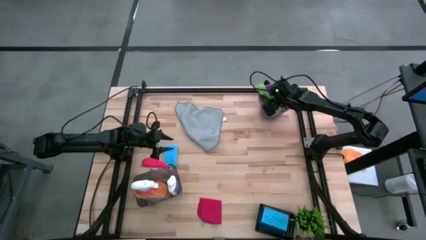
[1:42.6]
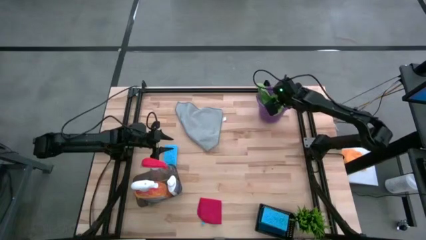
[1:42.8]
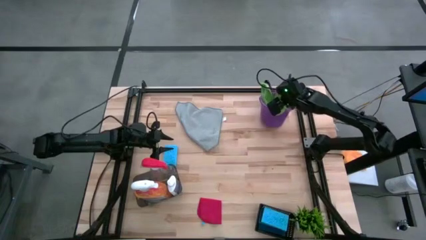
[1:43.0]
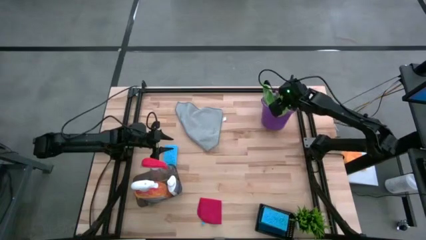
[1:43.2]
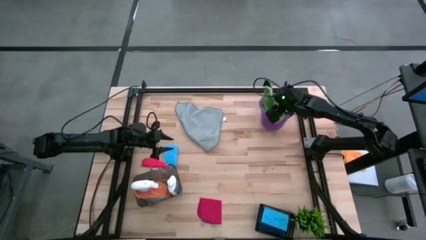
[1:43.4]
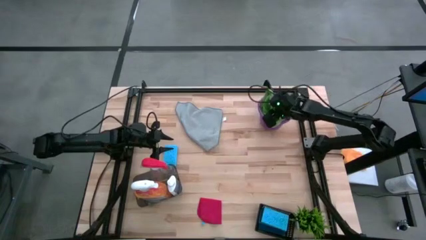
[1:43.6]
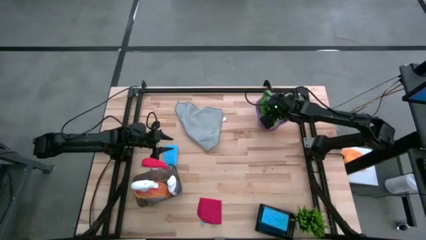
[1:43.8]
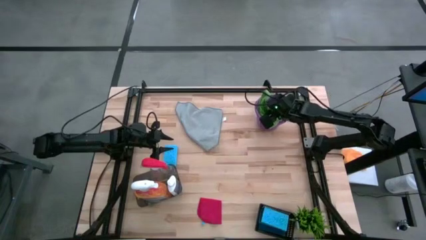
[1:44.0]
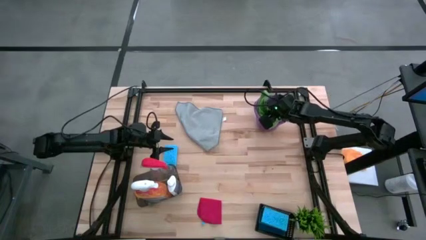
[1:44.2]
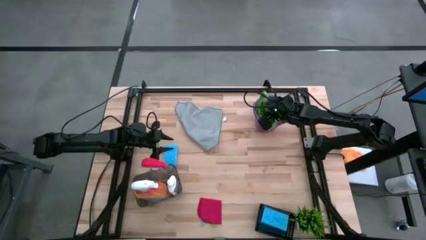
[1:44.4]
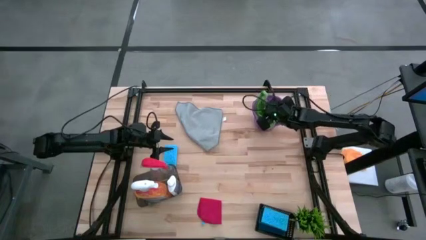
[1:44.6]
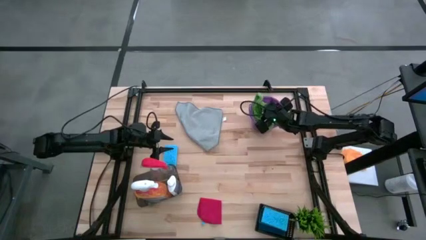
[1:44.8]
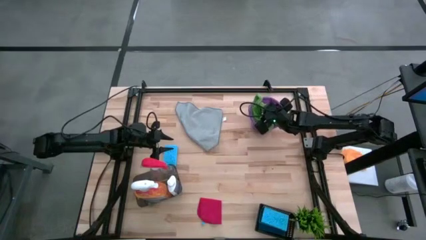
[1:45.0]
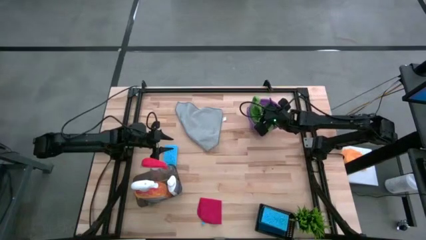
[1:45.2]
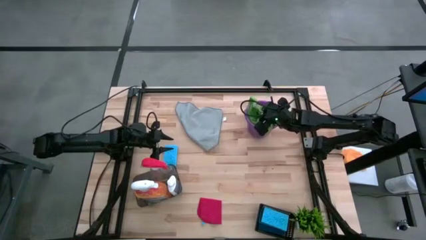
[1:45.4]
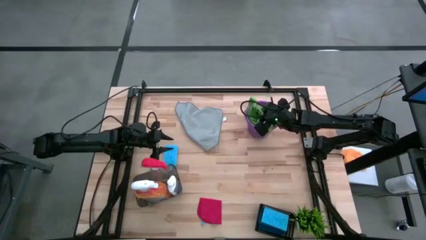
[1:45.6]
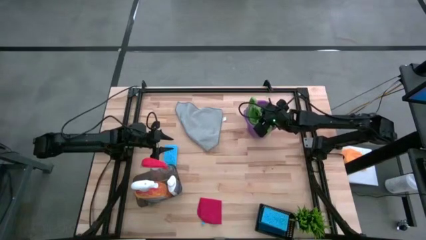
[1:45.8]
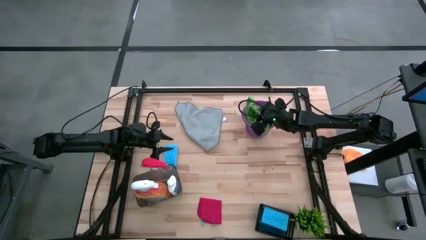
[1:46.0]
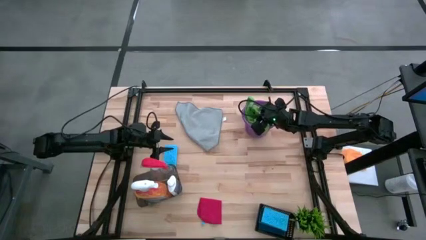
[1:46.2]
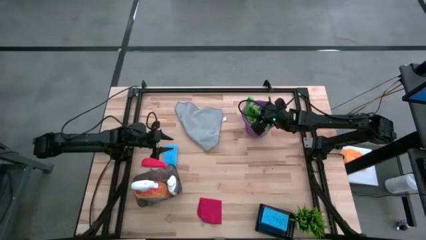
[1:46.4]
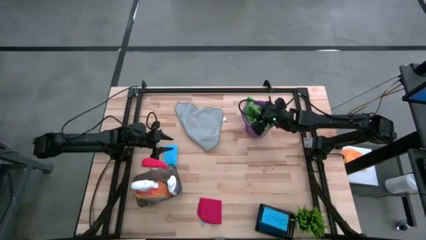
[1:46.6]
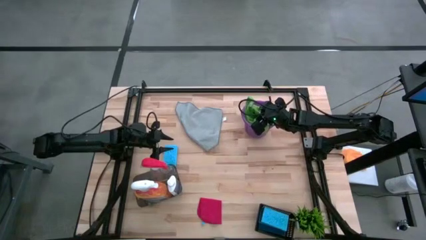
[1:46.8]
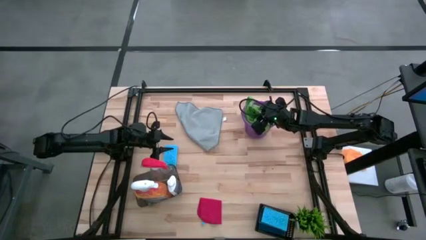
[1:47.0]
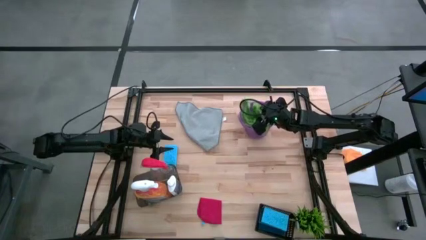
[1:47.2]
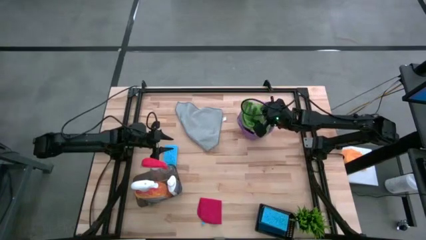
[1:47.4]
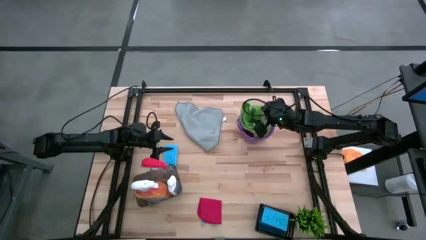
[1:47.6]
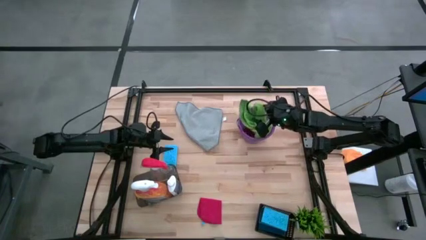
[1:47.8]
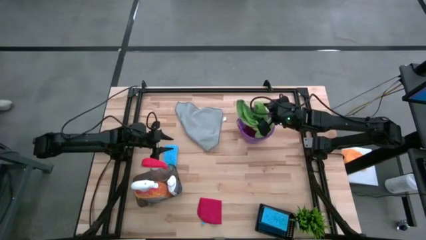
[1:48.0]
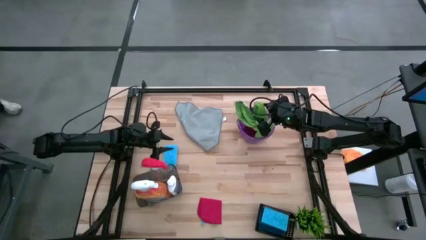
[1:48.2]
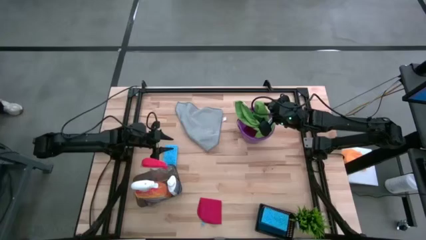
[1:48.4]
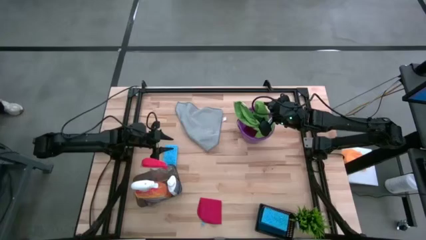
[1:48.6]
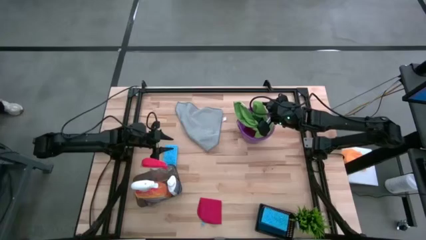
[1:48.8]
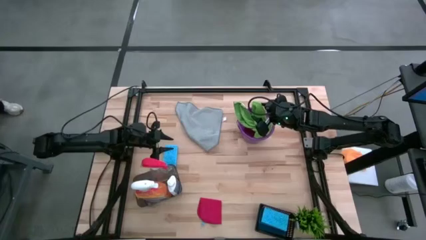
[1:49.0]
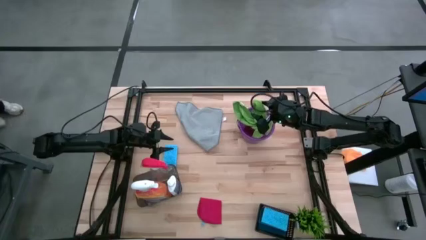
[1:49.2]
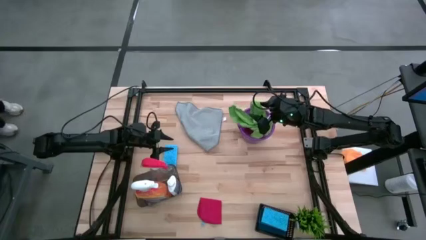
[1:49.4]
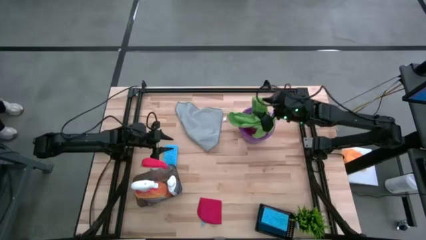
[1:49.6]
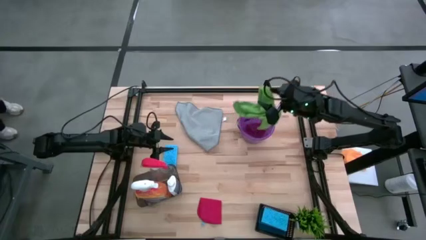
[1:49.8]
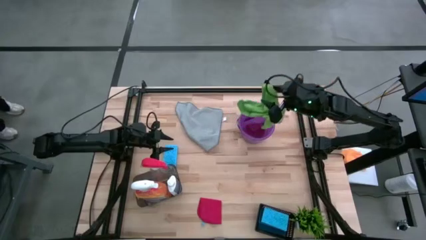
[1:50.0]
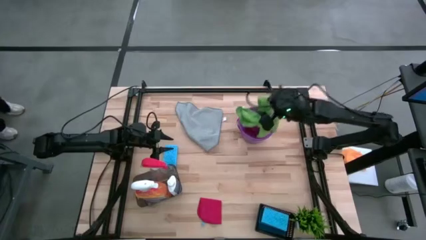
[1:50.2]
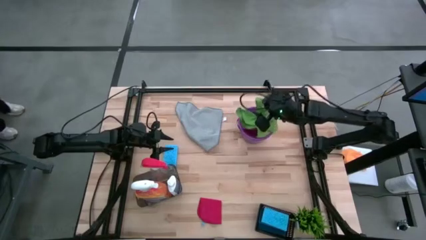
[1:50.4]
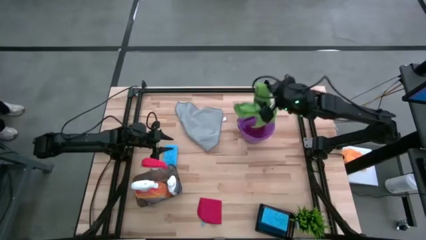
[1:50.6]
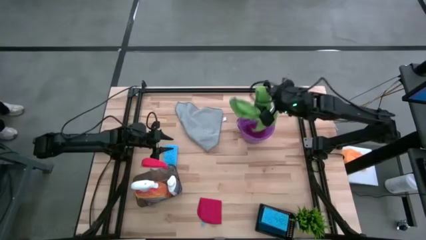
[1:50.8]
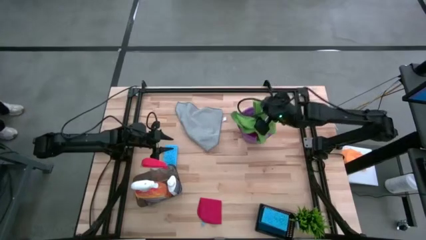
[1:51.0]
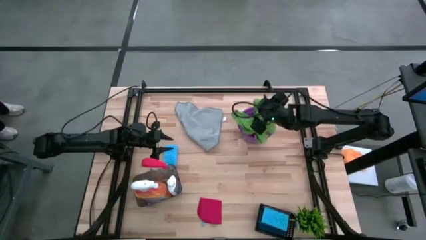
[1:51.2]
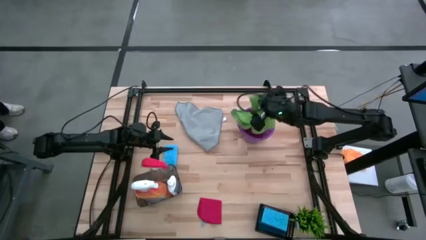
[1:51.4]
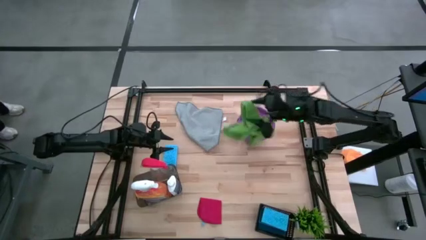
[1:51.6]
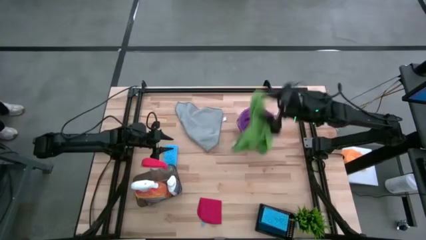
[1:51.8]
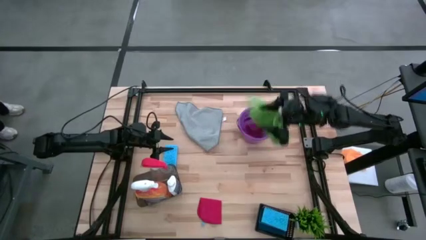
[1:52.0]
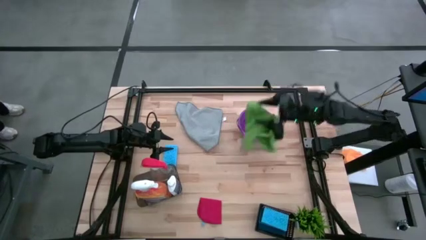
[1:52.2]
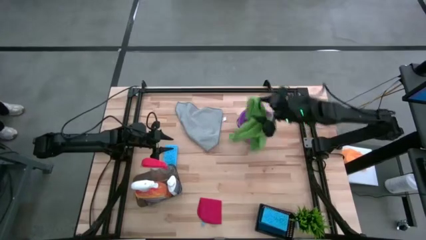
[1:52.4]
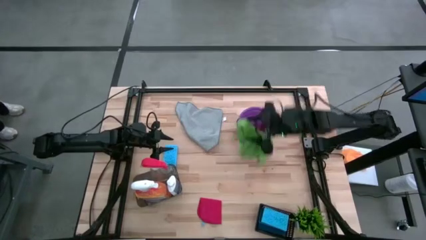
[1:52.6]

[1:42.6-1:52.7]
Task: Pick & Place Kitchen Items
Put the green microfiber towel into the purple bucket
